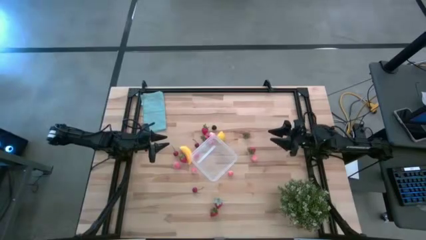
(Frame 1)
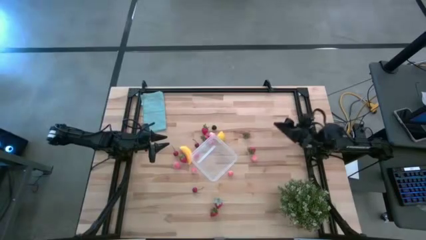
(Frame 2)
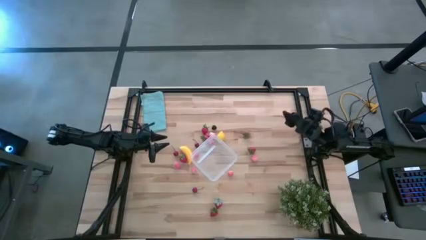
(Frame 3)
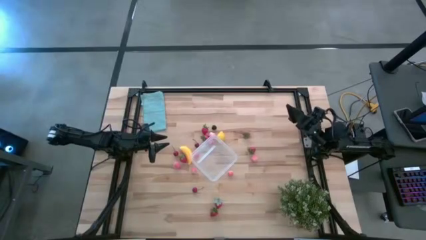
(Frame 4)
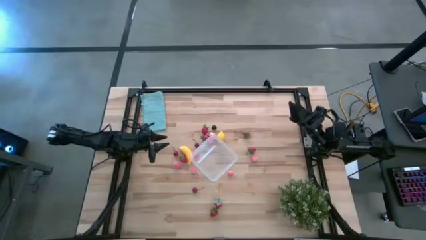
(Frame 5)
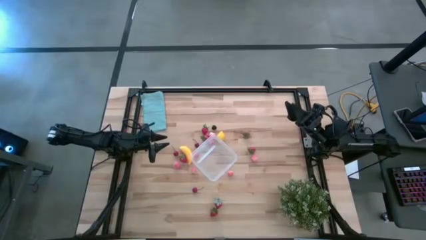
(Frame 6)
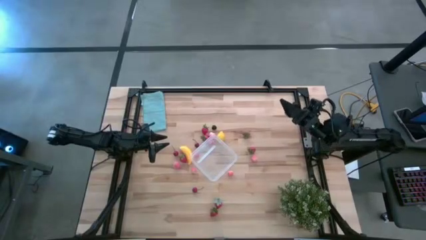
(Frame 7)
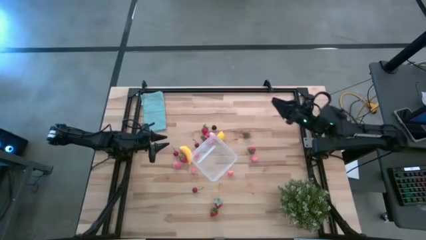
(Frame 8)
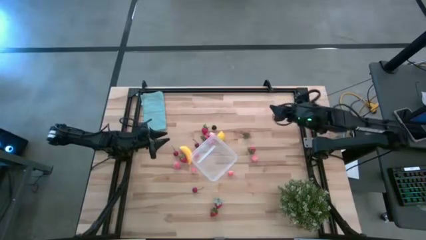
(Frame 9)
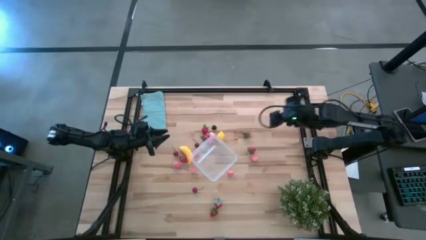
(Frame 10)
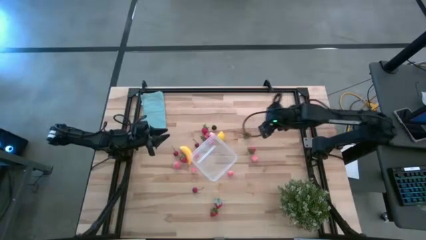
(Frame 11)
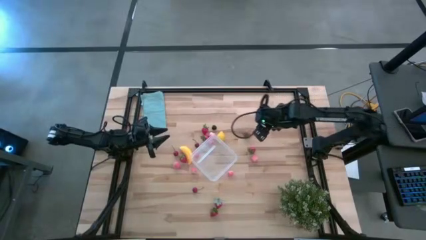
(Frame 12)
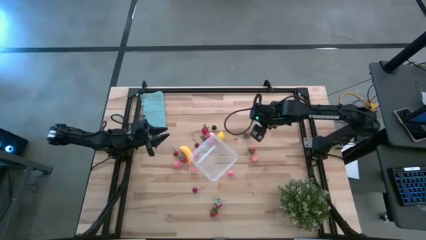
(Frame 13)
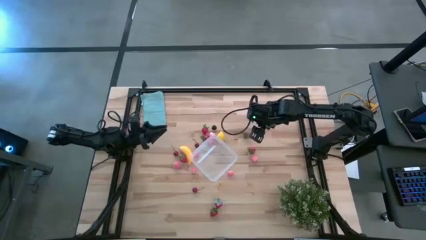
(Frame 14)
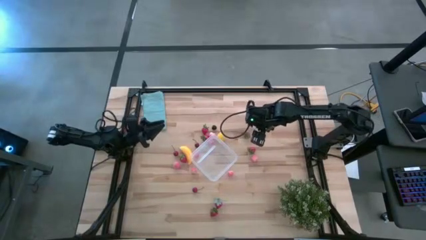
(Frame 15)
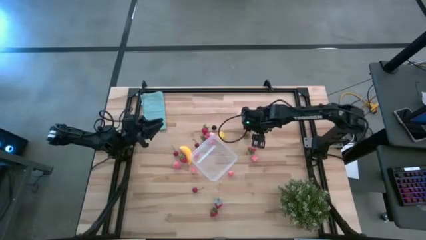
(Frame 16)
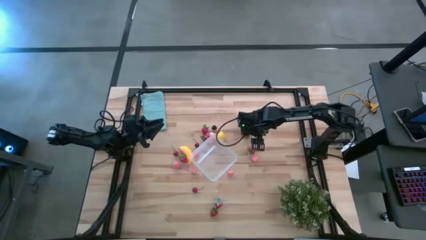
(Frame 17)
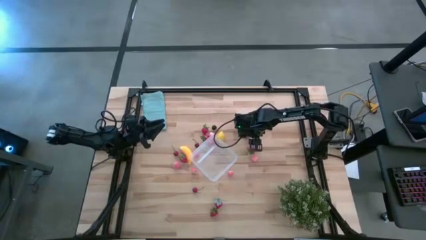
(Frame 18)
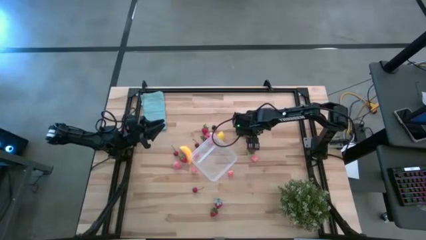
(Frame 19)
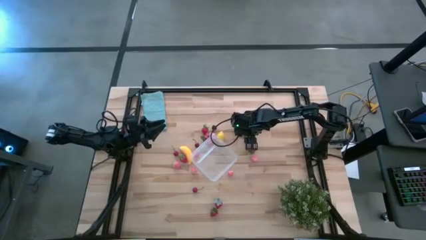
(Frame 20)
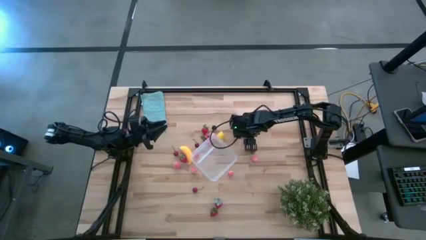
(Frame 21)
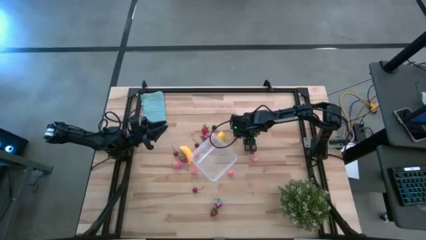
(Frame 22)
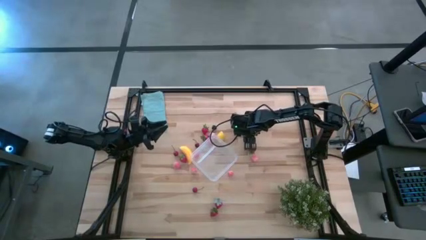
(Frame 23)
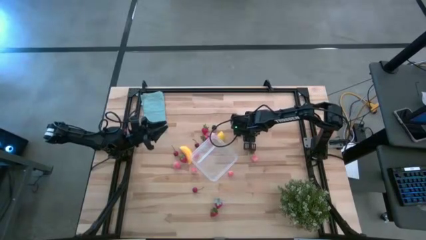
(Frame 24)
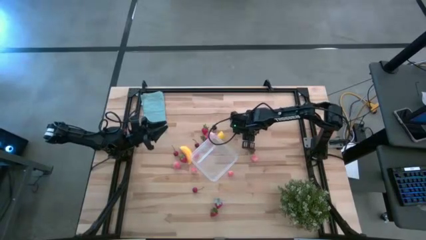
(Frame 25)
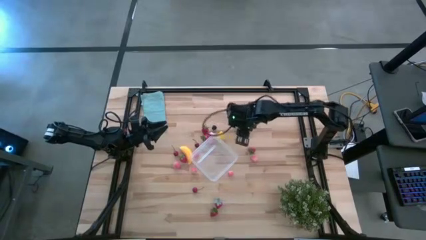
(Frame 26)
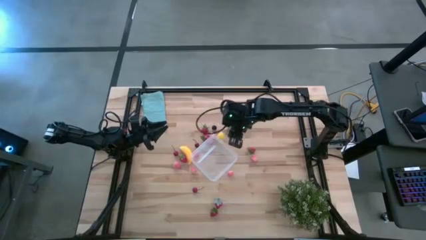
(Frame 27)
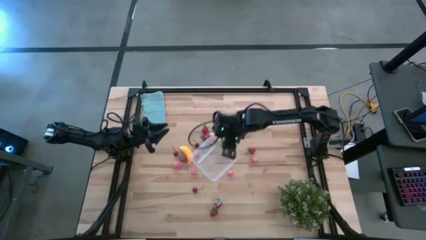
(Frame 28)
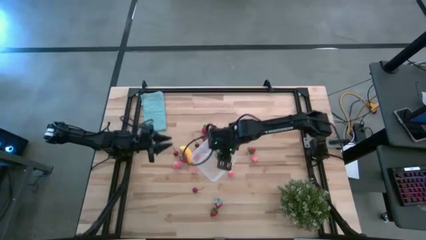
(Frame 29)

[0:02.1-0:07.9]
Task: Pick and placing Produce into tupperware
Put the red strawberry into the transparent container

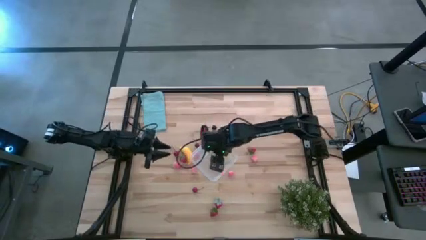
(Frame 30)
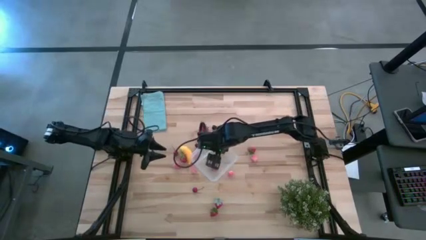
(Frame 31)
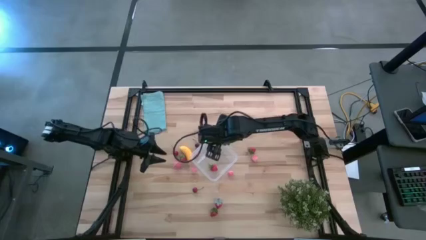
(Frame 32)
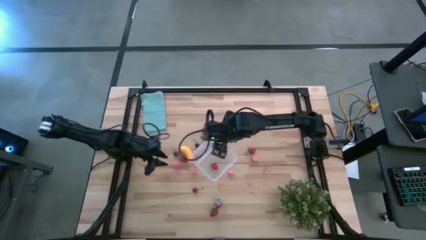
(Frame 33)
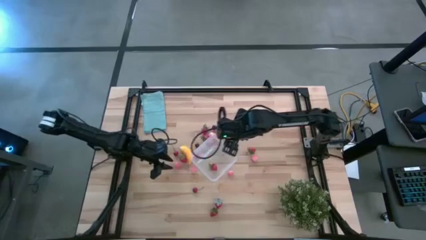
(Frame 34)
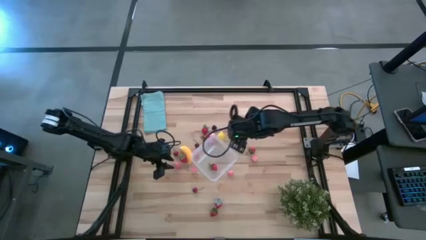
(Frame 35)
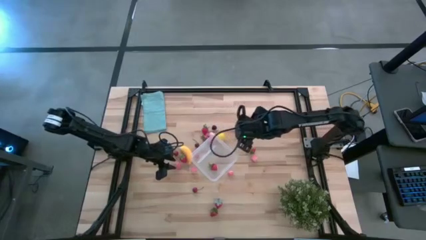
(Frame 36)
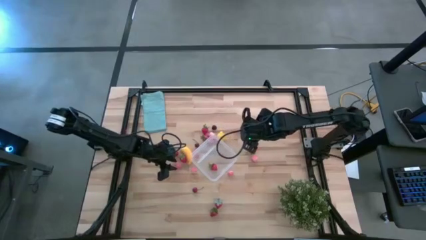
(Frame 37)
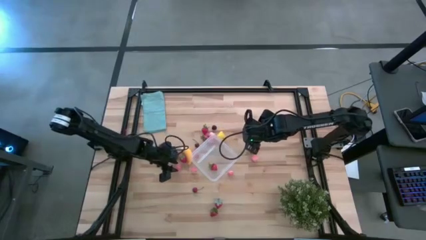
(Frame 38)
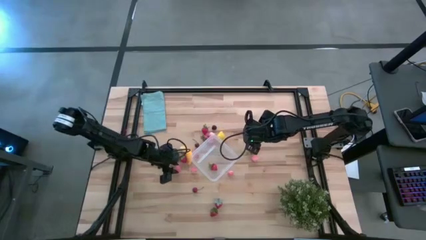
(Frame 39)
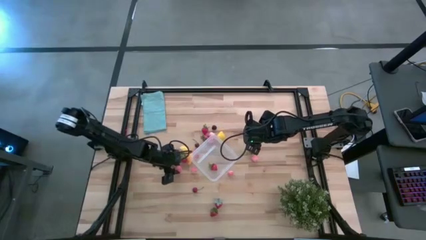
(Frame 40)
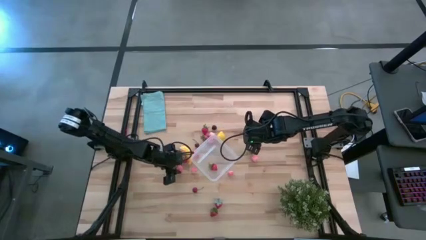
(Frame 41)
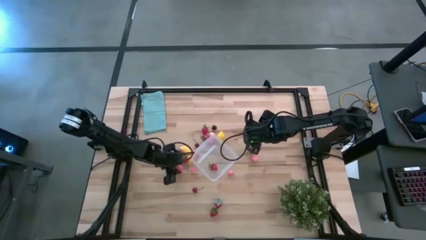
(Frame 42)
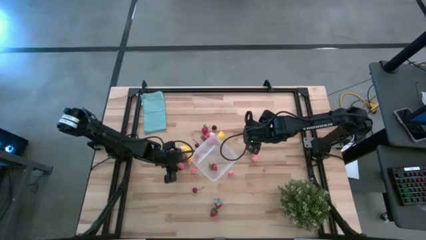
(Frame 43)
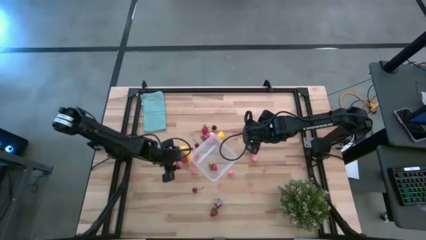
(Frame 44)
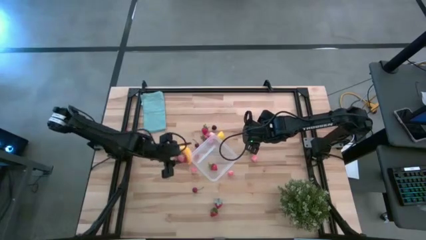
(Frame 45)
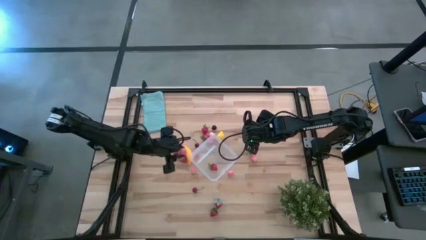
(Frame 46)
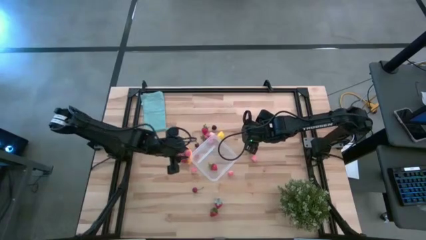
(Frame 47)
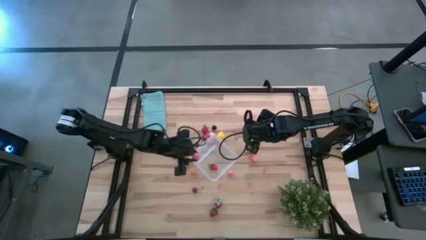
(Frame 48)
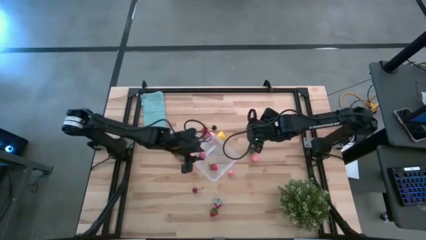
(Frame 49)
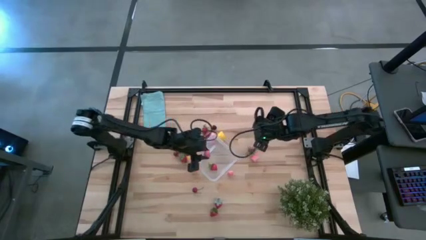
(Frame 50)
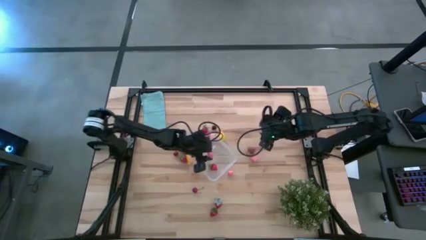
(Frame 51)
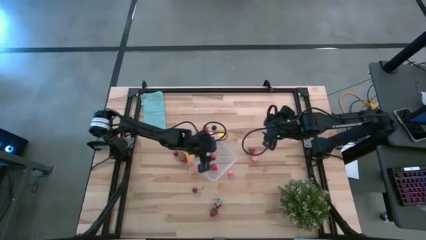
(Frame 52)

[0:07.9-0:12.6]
Put the pink peach into the transparent container

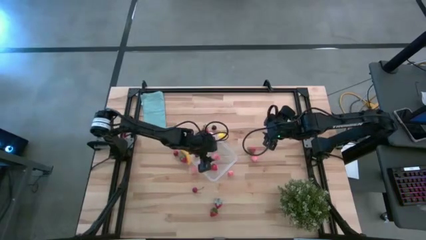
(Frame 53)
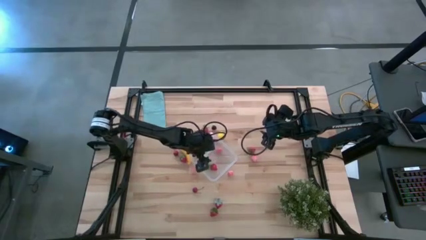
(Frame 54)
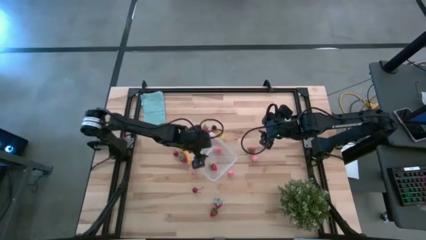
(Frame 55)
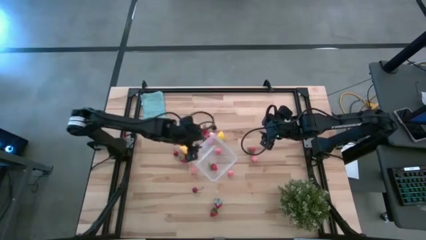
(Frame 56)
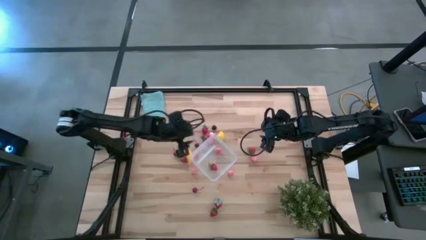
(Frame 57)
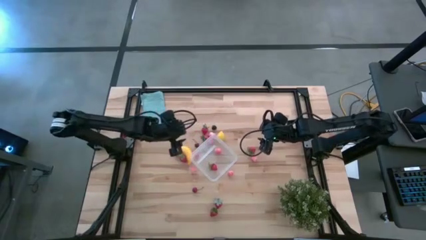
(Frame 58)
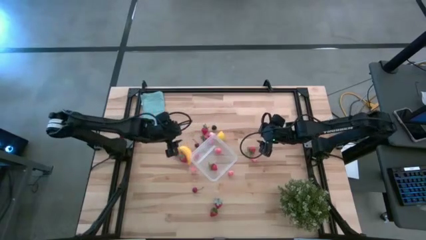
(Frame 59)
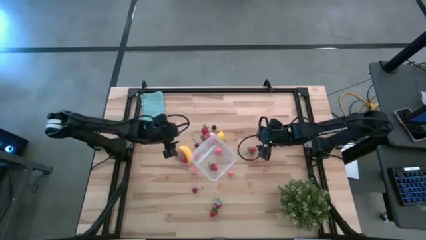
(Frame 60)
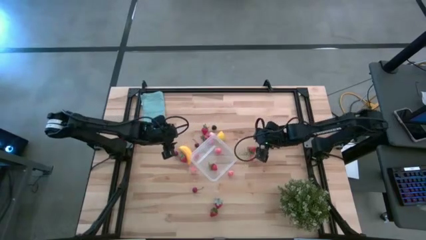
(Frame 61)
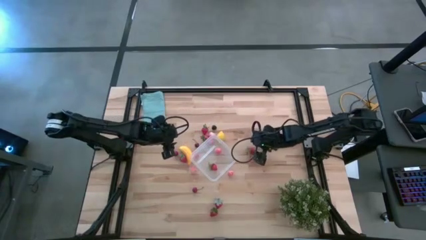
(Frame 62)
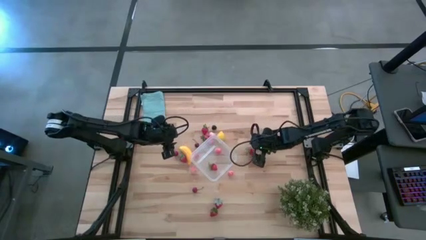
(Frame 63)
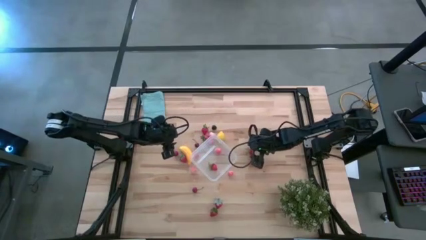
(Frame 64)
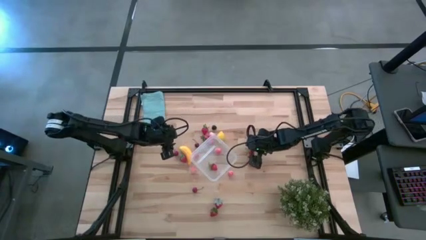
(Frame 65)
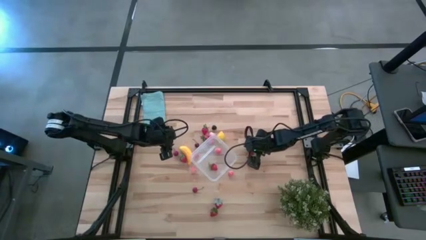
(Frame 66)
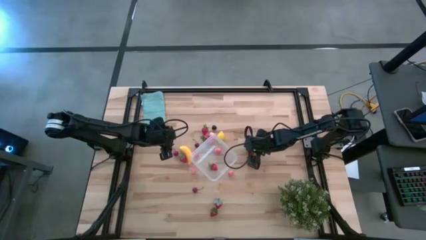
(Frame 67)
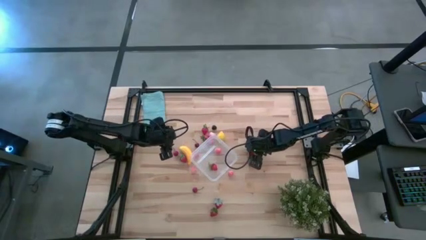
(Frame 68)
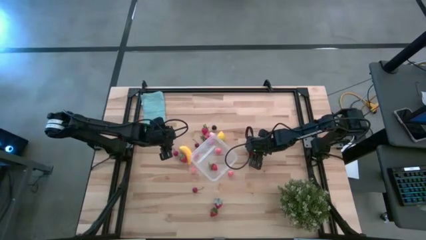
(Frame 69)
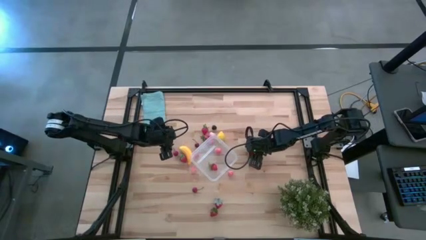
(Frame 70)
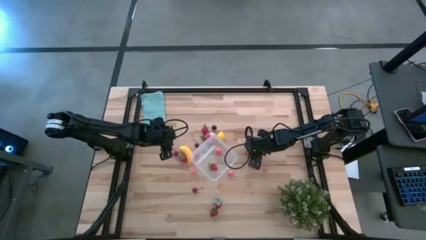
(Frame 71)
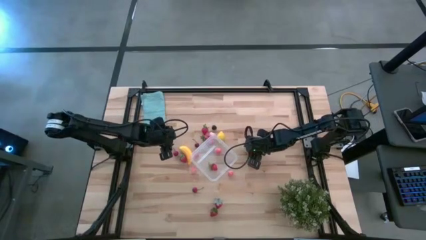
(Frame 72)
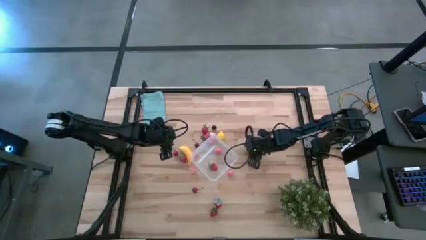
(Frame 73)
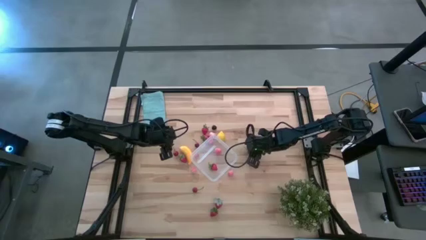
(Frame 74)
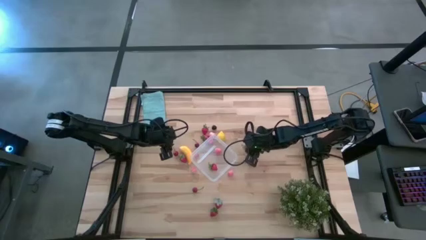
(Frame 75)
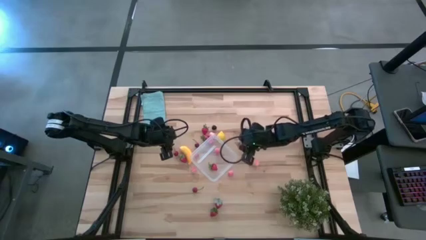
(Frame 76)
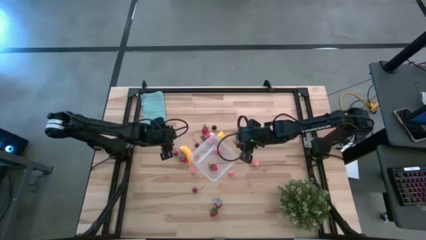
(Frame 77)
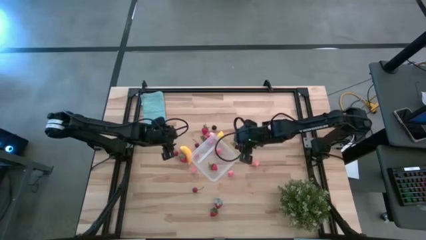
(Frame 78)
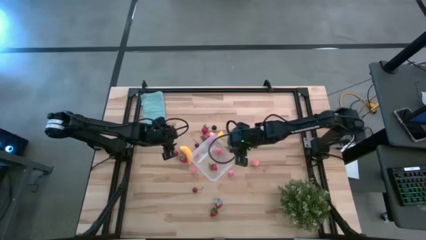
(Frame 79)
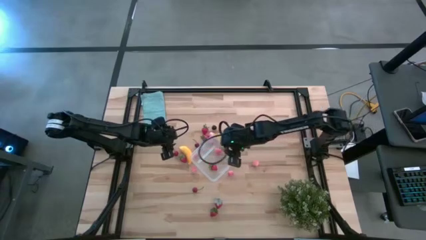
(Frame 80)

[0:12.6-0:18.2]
Put the red strawberry into the transparent container

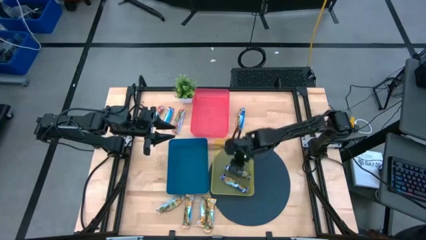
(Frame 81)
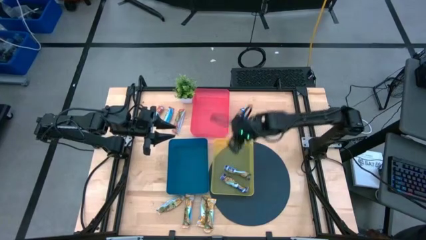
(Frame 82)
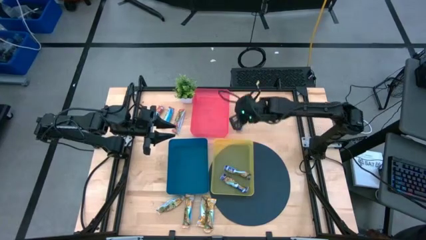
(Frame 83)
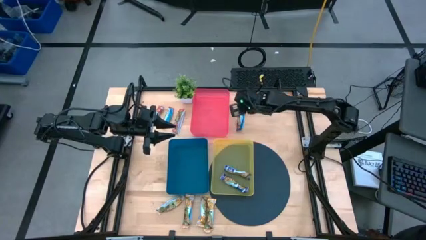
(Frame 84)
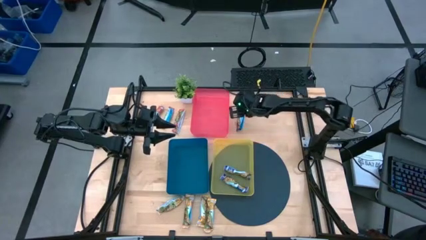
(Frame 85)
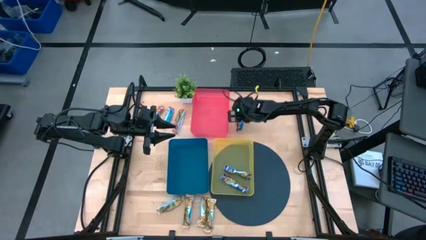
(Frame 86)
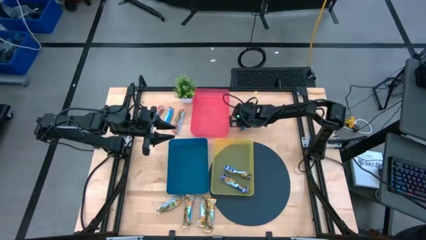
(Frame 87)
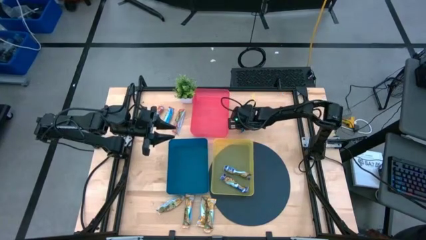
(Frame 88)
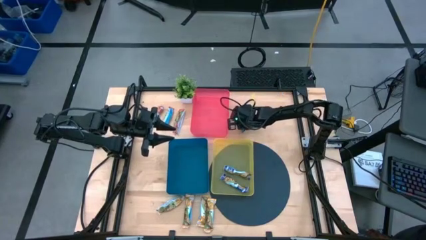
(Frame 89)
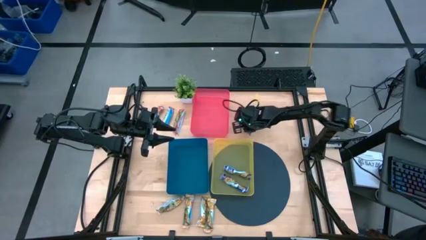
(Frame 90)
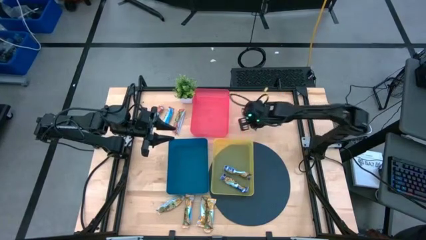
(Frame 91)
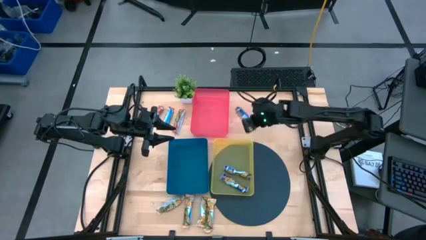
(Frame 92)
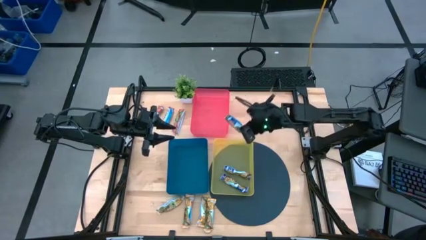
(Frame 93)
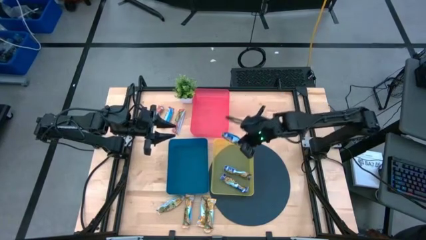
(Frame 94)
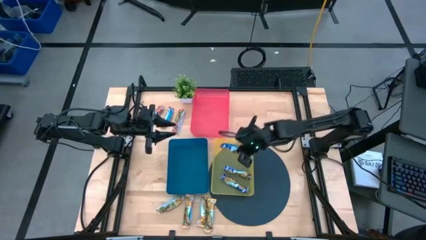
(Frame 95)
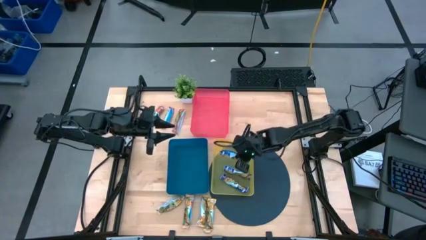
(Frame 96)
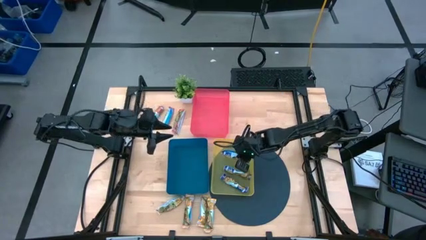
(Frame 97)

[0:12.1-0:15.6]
Task: Pick and place Granola Bars by type
Put the blue granola bar into the yellow bin
